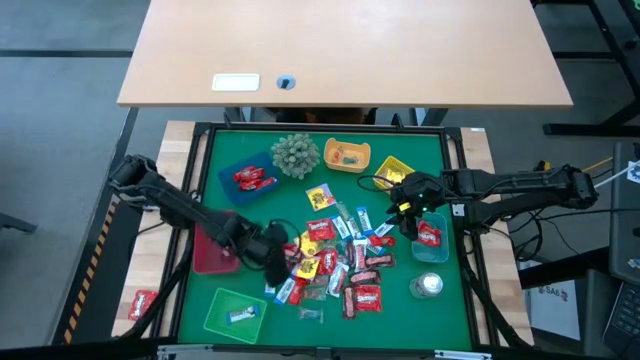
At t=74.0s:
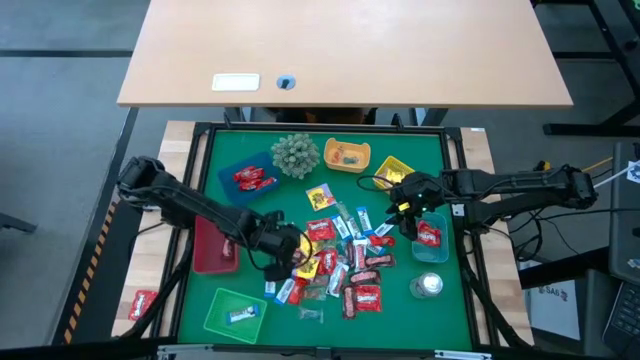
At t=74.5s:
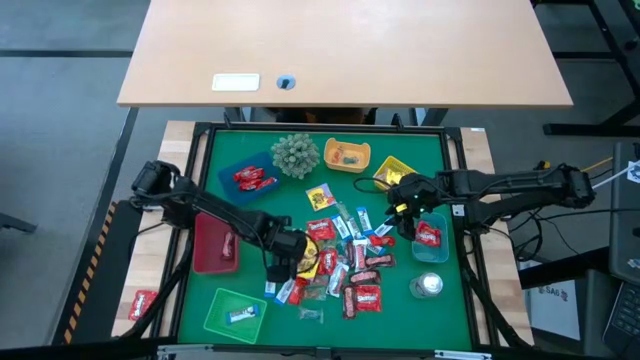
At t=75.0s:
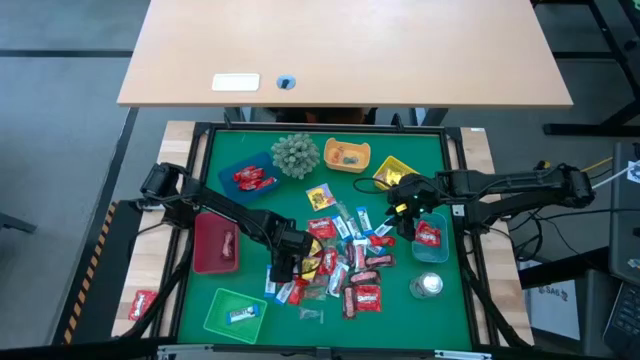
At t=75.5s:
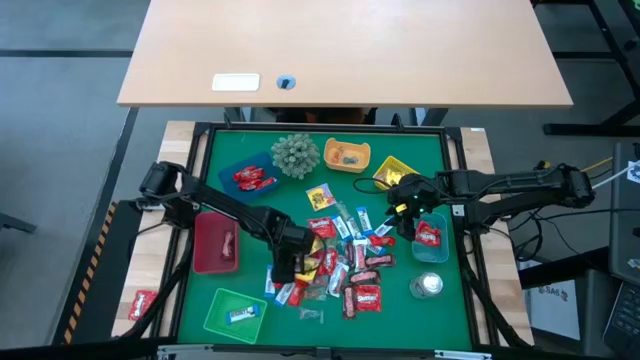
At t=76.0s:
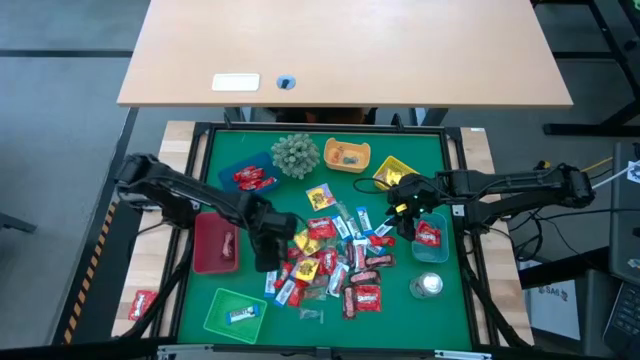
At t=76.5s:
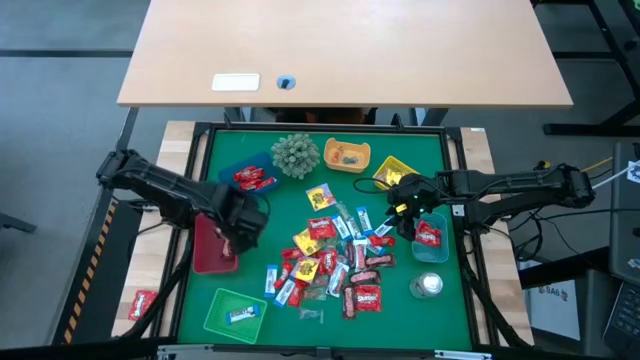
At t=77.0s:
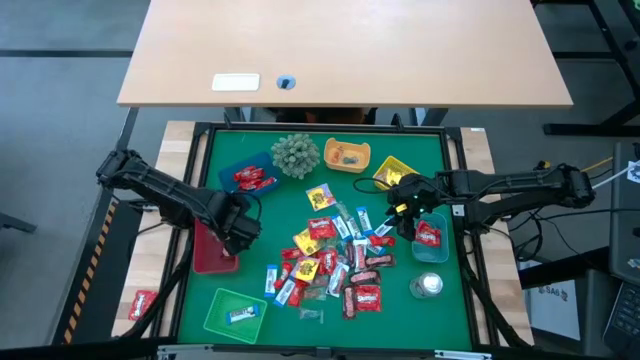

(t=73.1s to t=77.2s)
Task: Sort candy
Put the brown chocolate into the red bin

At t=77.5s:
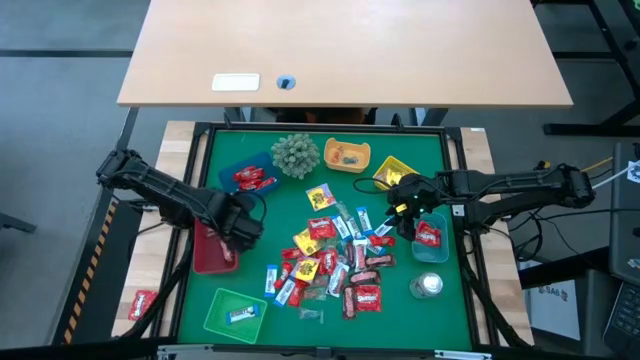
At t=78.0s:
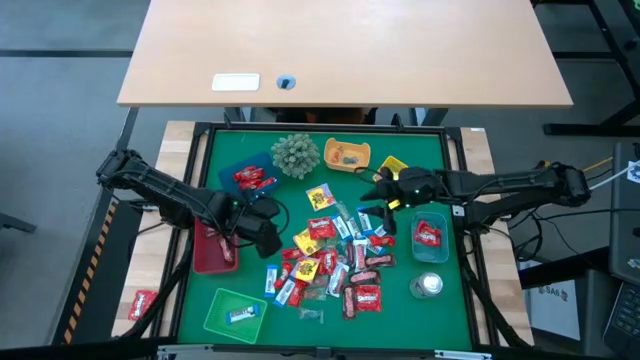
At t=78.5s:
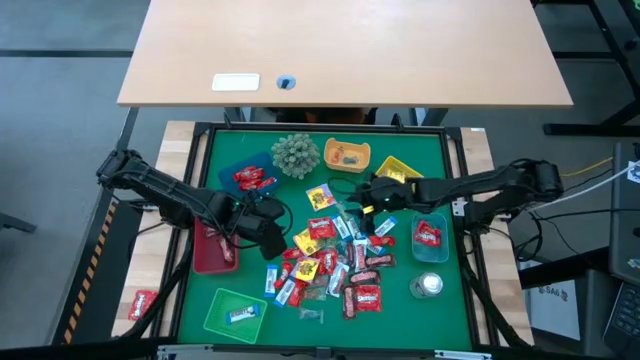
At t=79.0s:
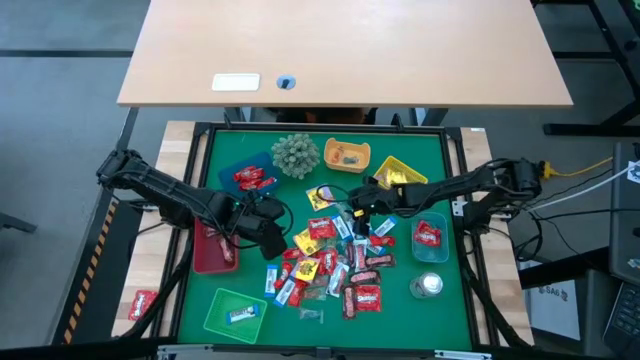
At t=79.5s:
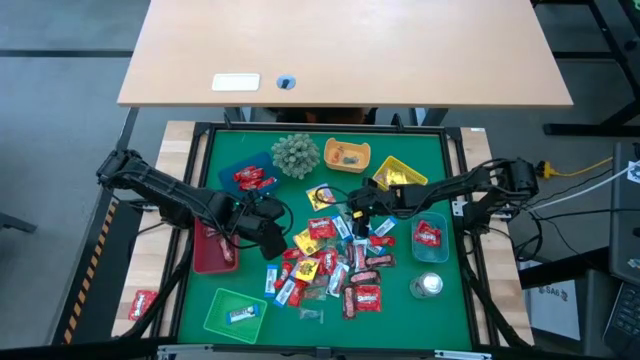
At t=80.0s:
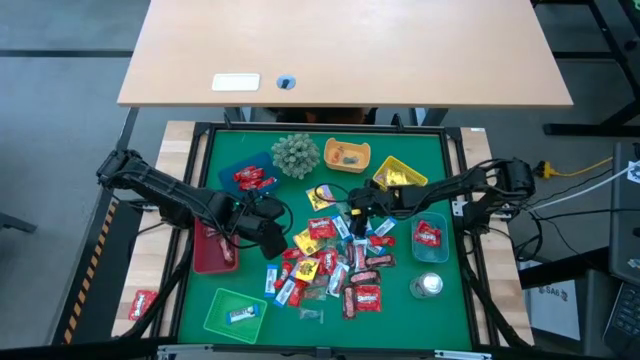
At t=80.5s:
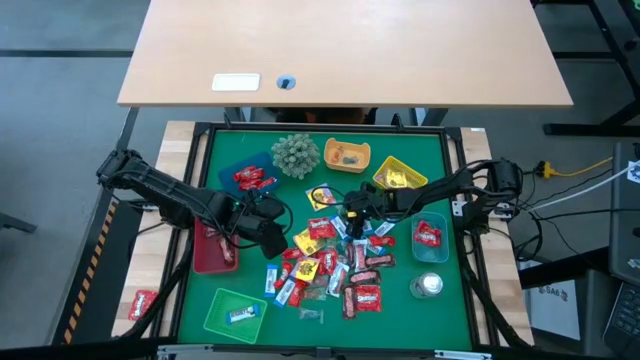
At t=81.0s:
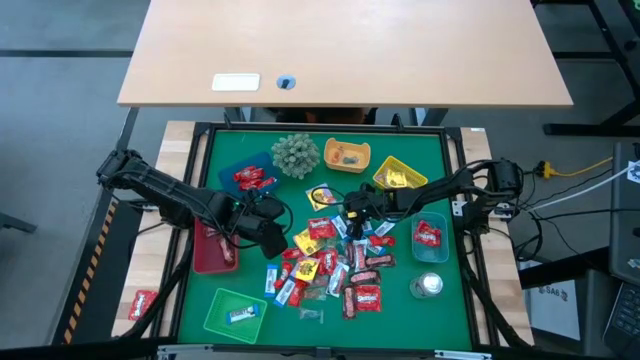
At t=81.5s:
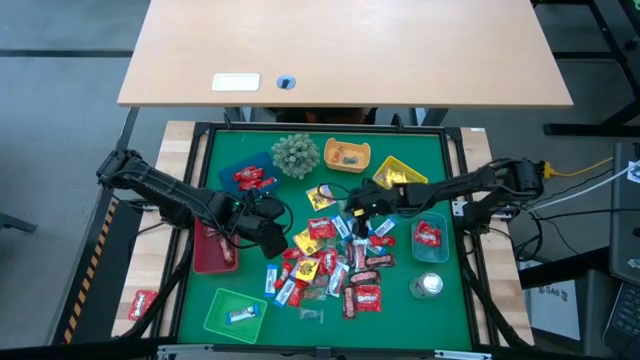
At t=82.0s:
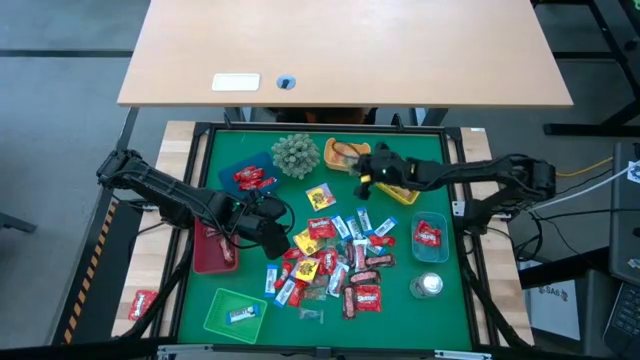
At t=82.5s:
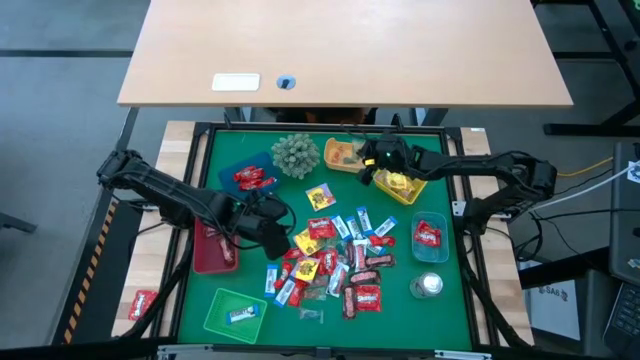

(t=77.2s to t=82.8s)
Put the green gummy into the orange bin

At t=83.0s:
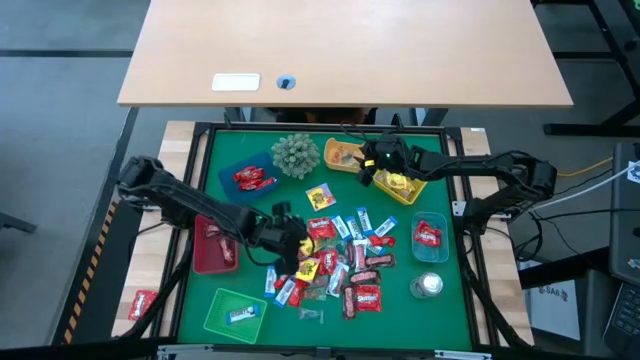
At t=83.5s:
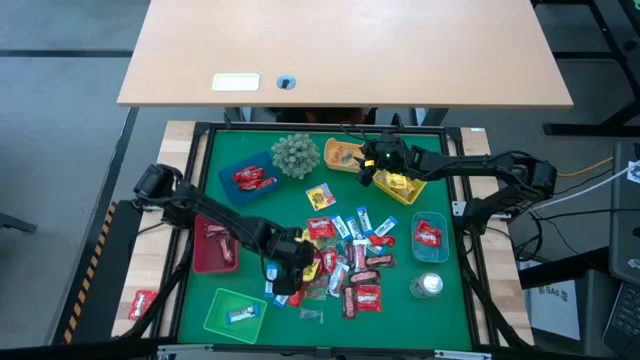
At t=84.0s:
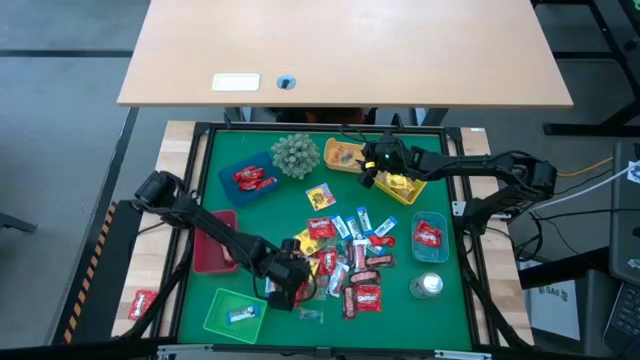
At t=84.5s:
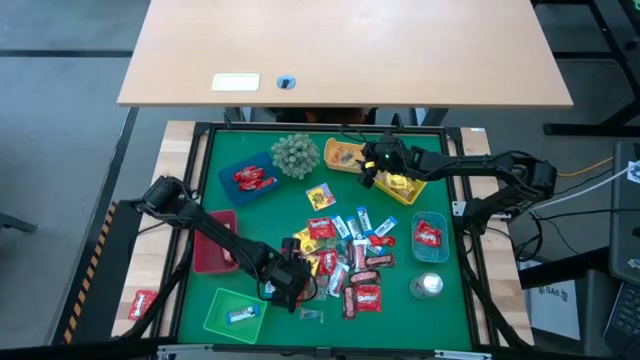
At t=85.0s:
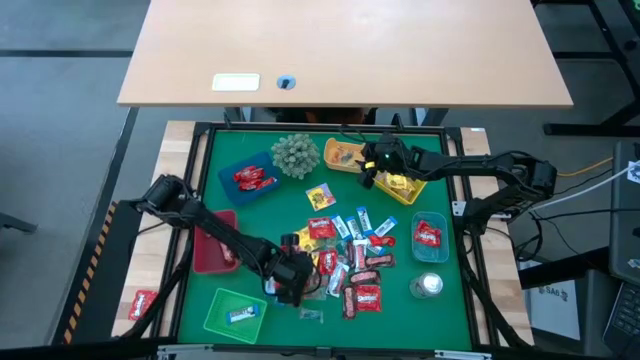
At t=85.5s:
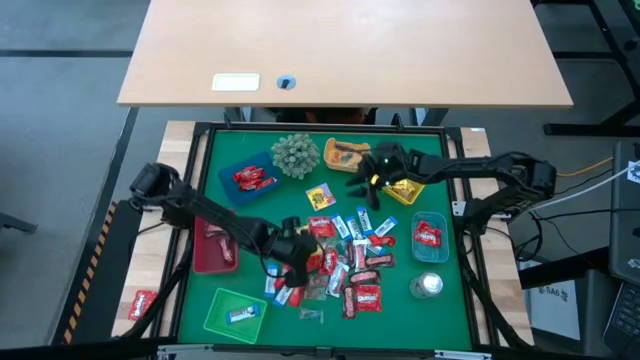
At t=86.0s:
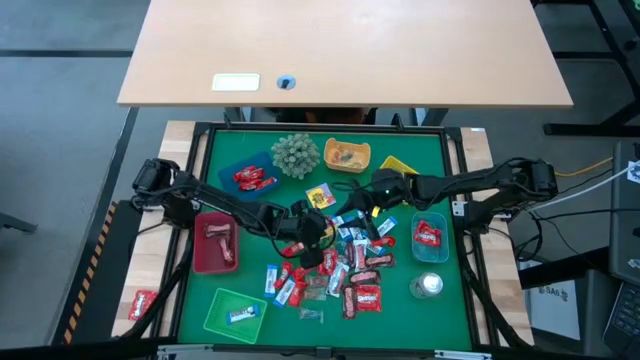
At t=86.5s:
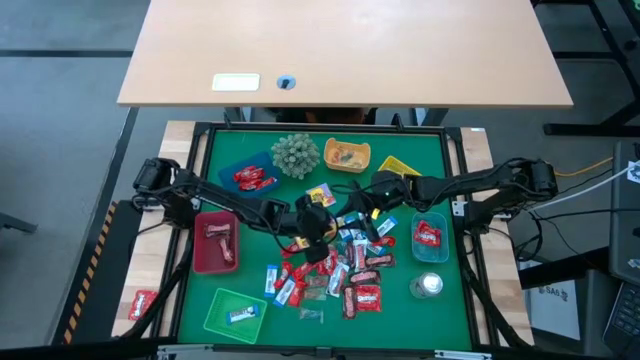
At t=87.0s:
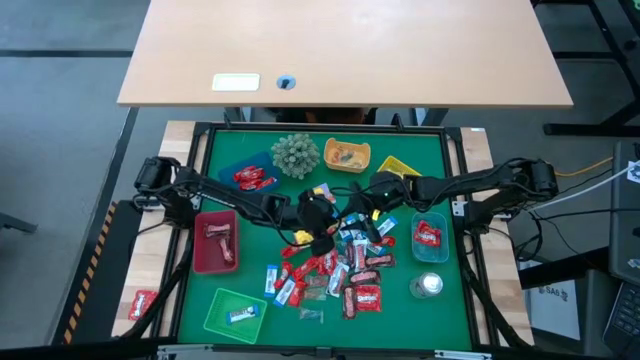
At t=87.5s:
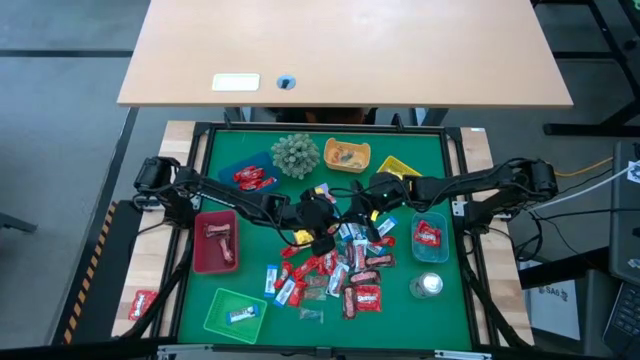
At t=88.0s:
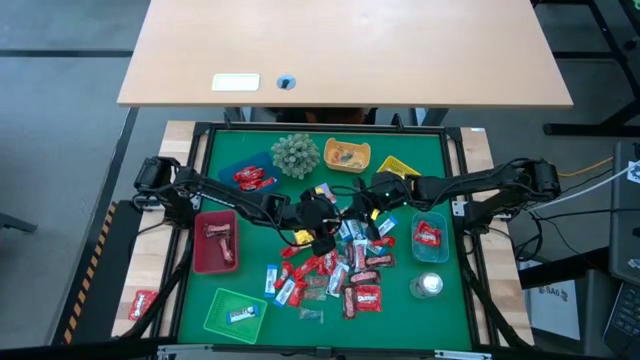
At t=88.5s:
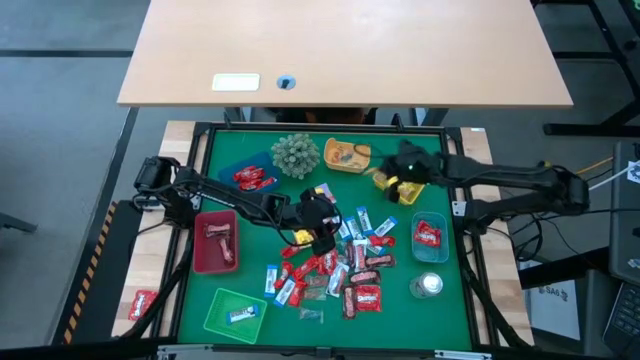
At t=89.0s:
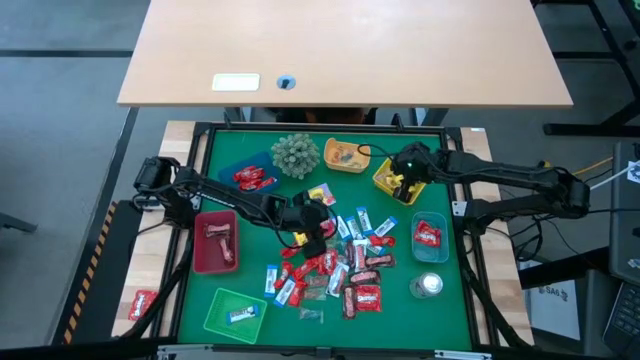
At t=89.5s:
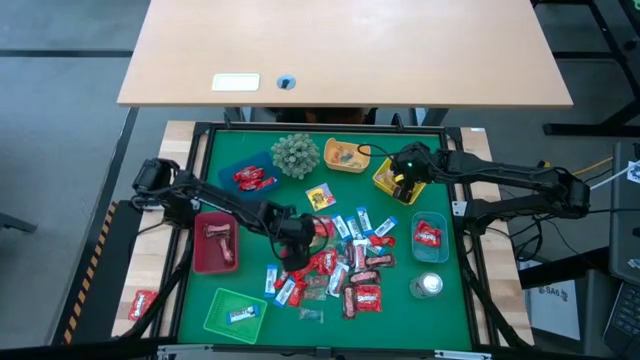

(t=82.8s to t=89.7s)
Put the yellow candy into the yellow bin

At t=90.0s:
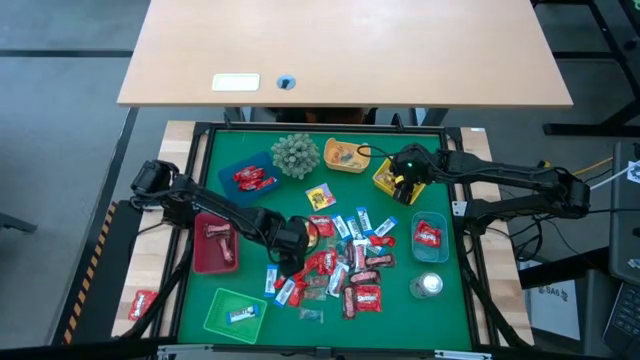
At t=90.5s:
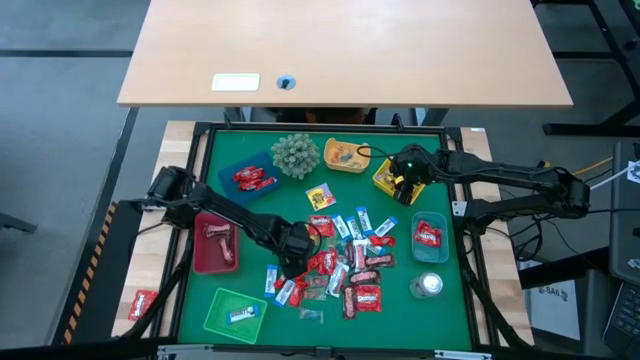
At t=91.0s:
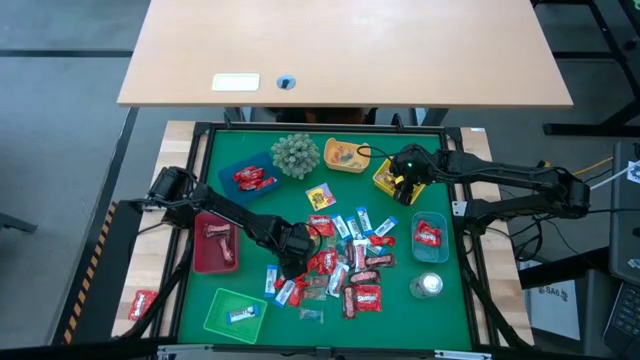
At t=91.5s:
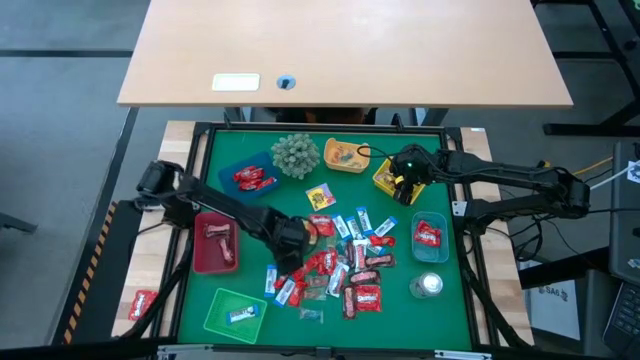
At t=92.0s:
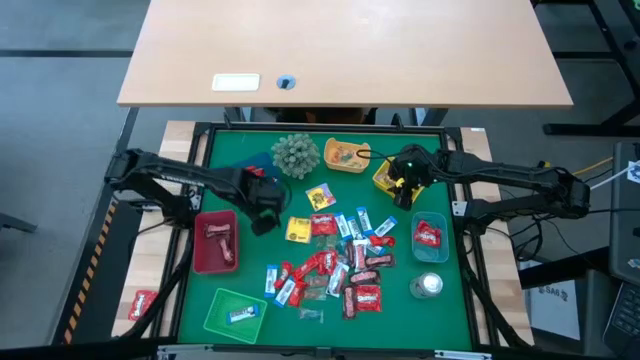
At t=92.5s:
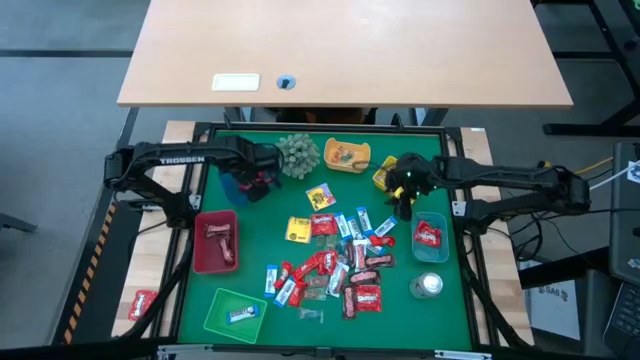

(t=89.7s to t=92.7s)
Put the red chocolate into the blue bin

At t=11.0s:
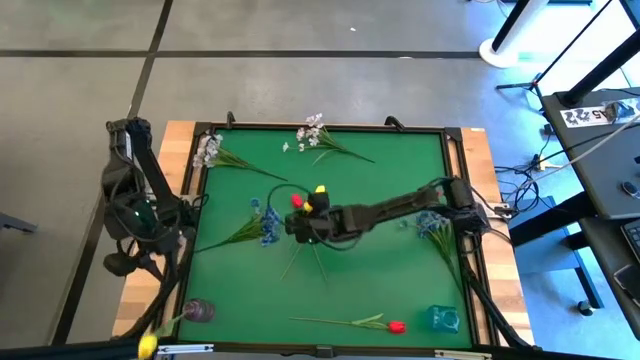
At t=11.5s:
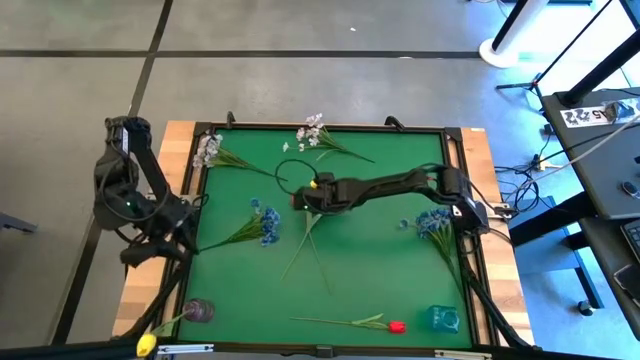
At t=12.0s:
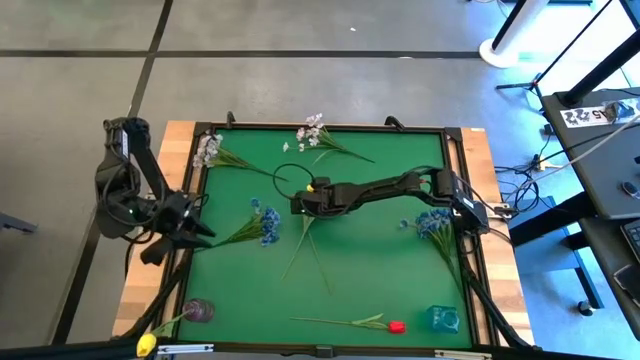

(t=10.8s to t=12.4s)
Task: Sort flowers into vase by color
Put the yellow tulip into the purple vase
